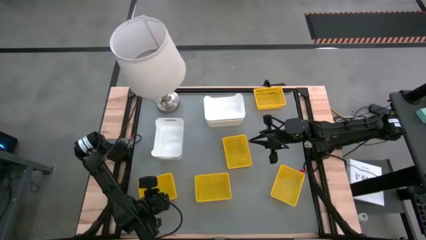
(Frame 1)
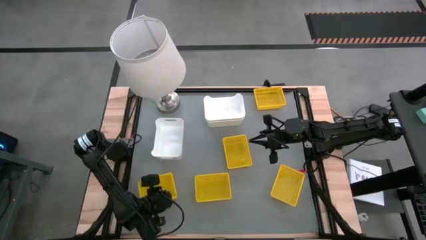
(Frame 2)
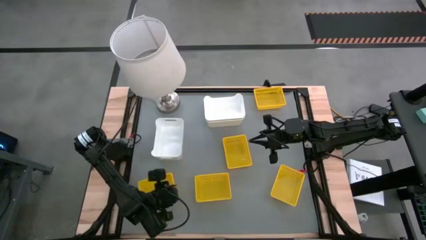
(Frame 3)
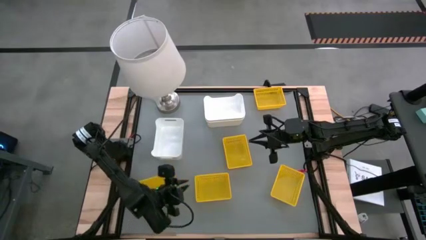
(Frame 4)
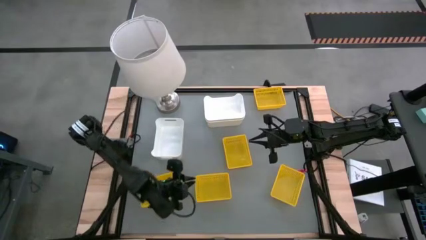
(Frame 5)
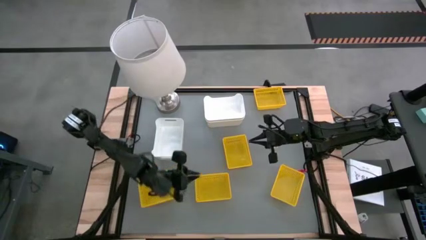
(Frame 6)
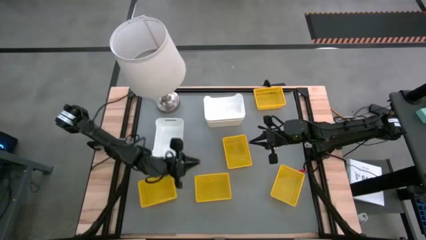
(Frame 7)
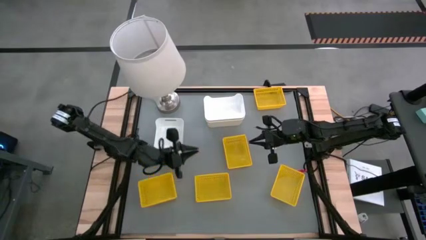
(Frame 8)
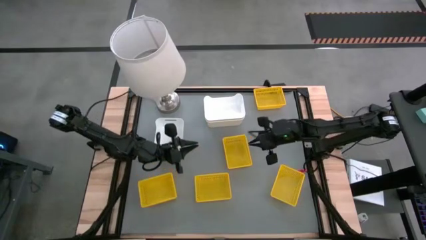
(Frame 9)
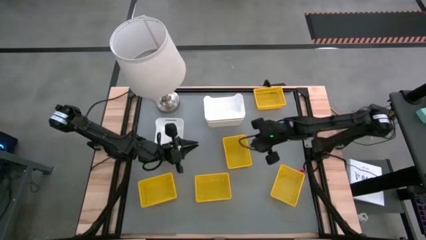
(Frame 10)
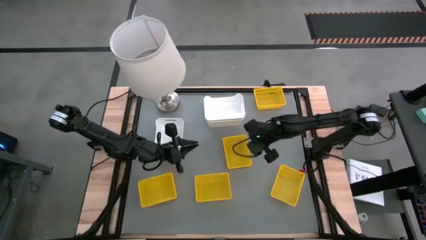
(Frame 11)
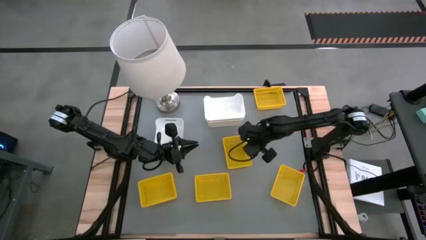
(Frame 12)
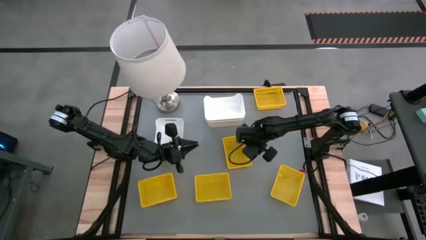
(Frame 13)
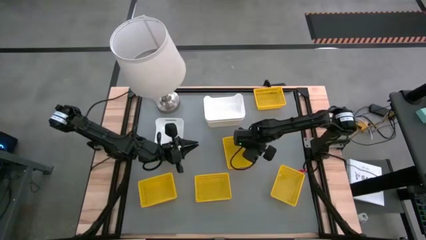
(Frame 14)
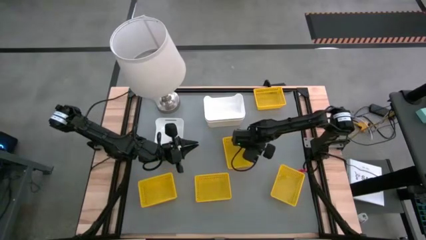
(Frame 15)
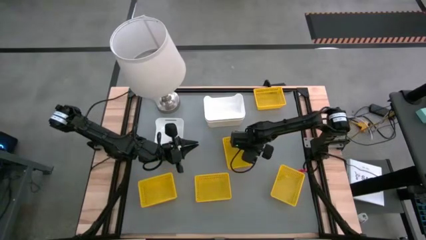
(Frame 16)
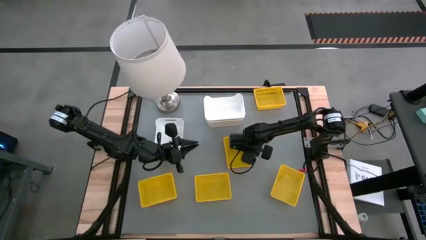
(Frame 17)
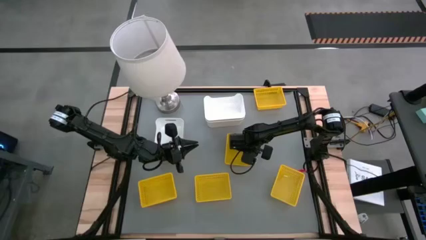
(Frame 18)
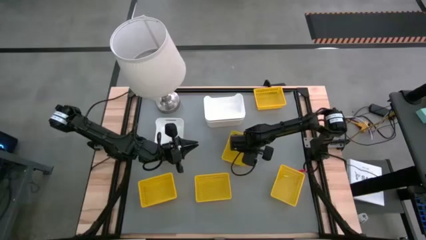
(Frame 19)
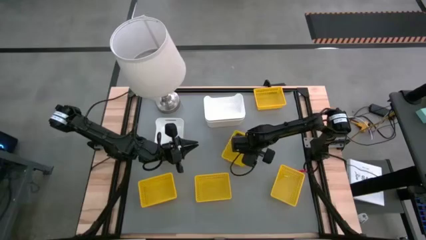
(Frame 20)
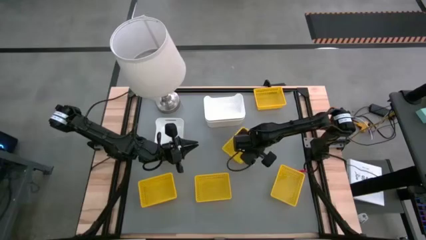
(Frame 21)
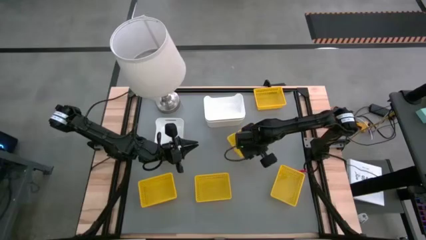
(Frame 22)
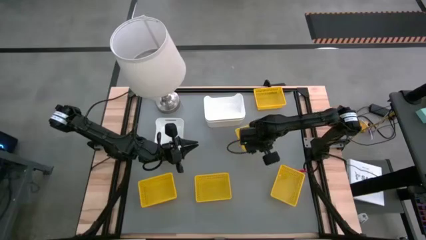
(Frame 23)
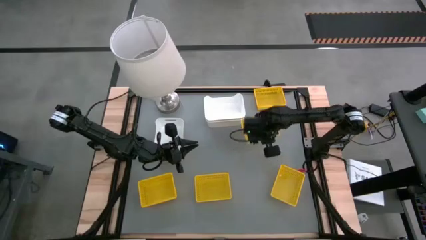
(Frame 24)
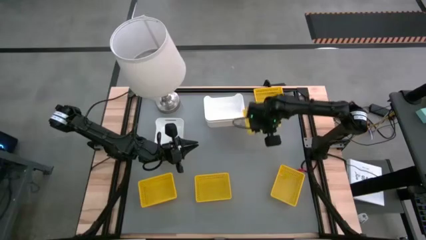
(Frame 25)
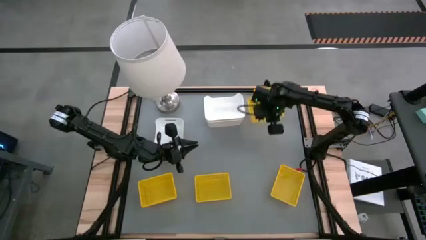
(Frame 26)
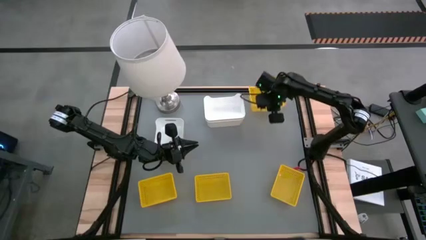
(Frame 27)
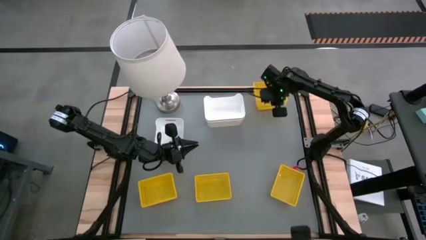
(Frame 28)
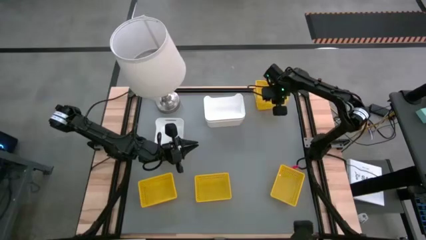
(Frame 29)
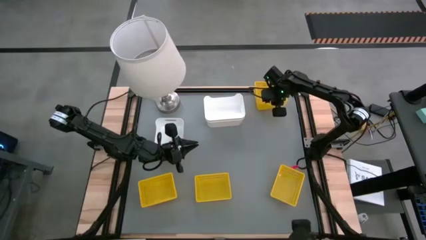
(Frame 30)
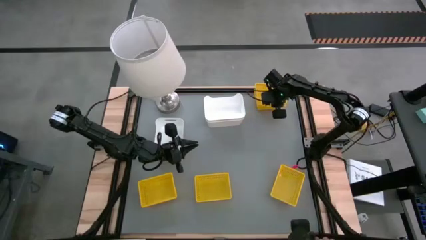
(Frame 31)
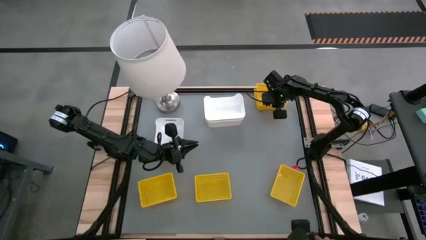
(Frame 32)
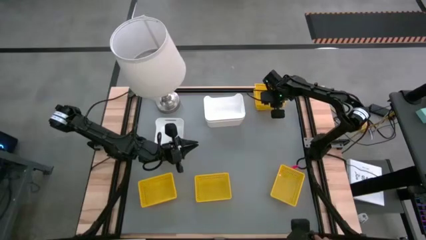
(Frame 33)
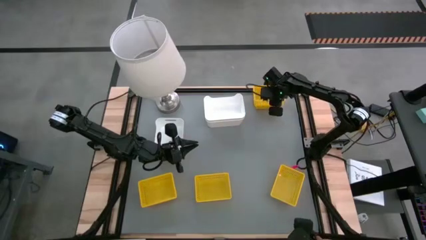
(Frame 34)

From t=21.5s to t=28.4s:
Stack the yellow basket on the other yellow basket

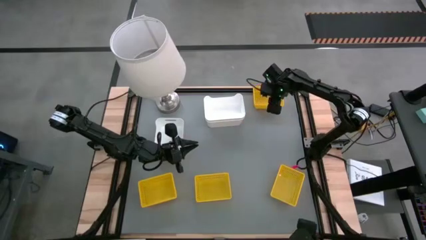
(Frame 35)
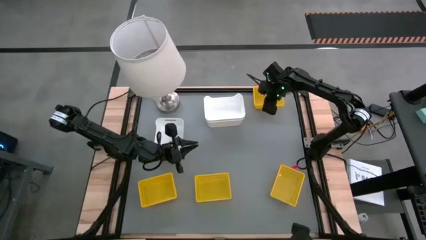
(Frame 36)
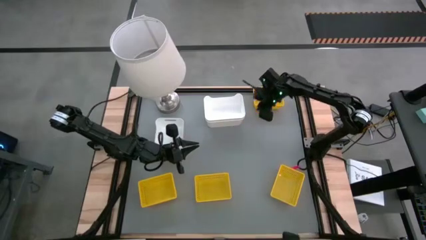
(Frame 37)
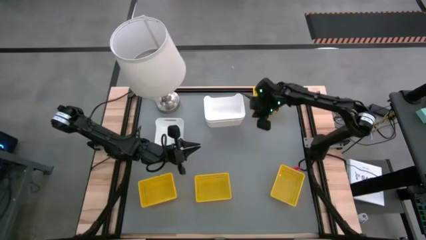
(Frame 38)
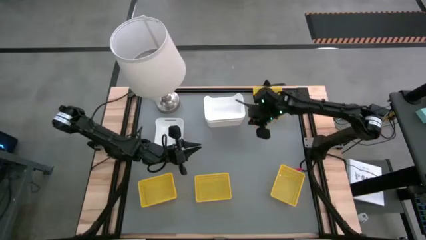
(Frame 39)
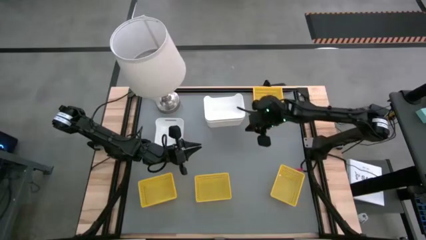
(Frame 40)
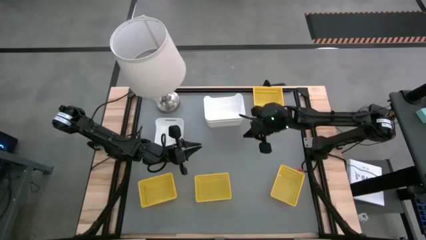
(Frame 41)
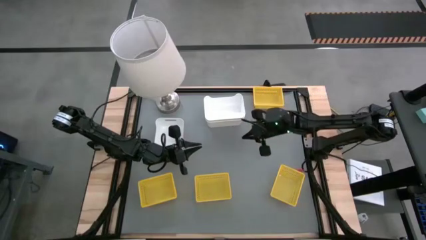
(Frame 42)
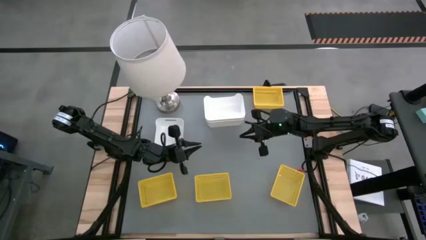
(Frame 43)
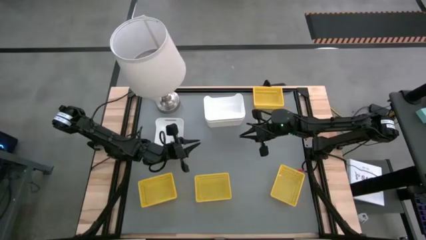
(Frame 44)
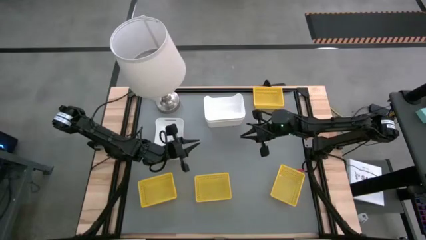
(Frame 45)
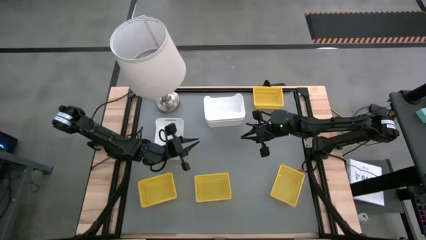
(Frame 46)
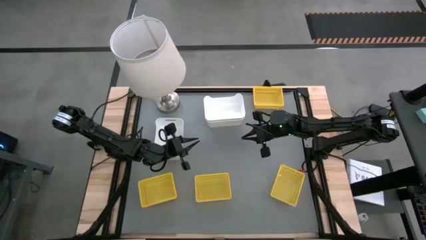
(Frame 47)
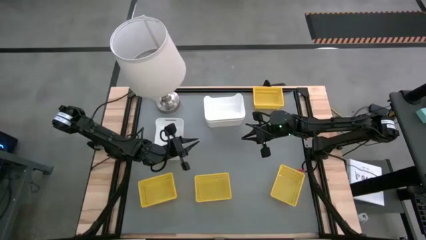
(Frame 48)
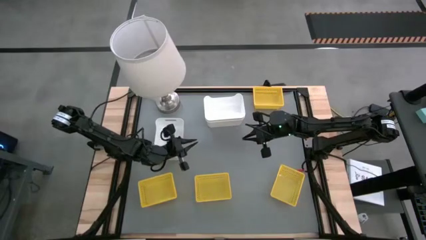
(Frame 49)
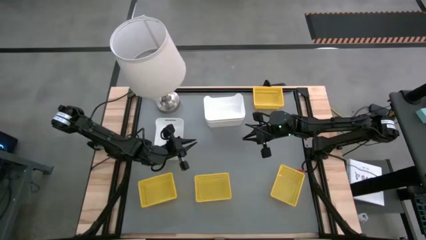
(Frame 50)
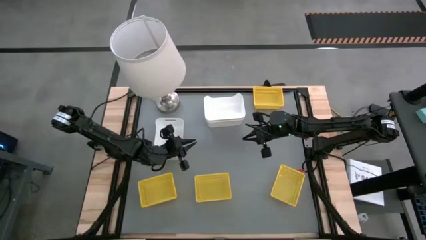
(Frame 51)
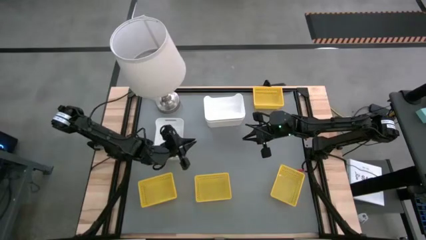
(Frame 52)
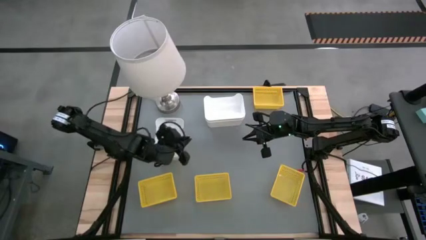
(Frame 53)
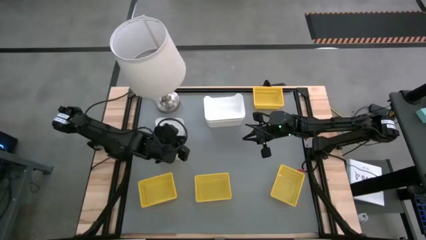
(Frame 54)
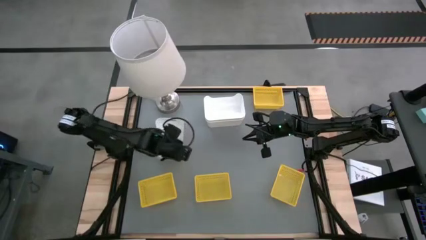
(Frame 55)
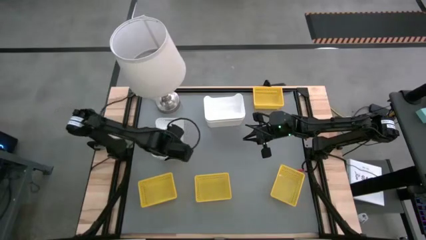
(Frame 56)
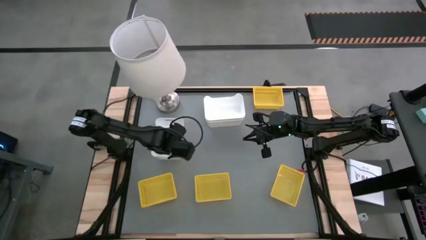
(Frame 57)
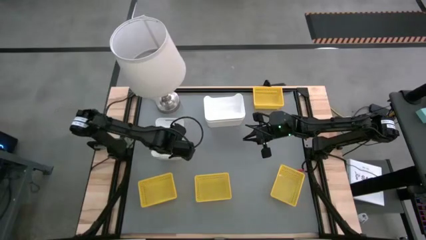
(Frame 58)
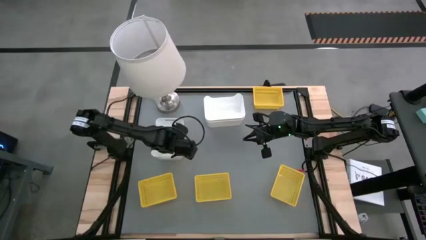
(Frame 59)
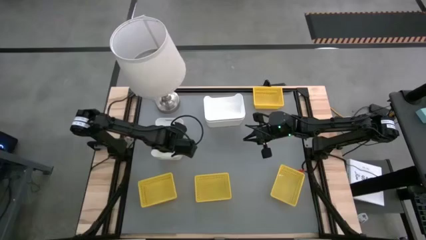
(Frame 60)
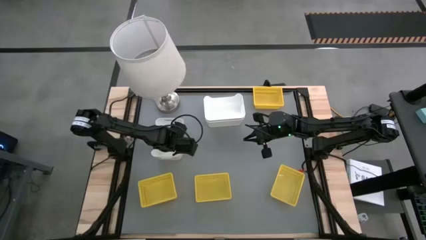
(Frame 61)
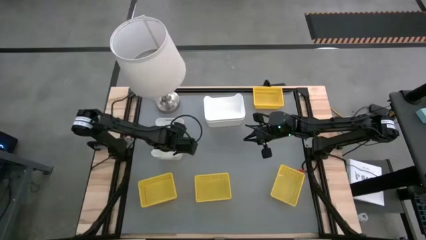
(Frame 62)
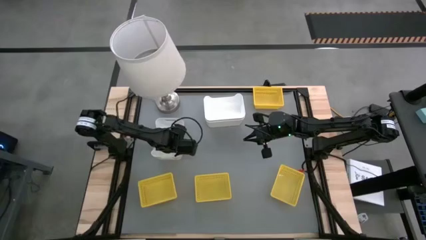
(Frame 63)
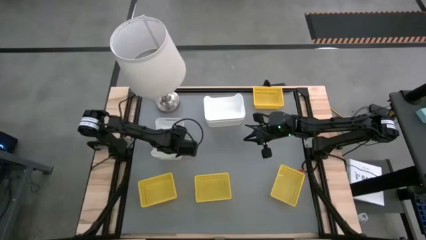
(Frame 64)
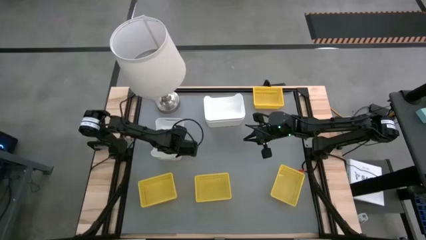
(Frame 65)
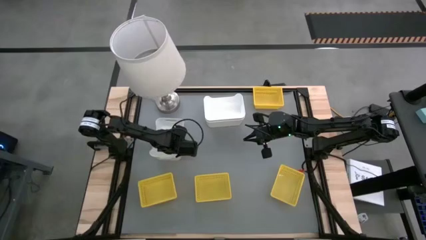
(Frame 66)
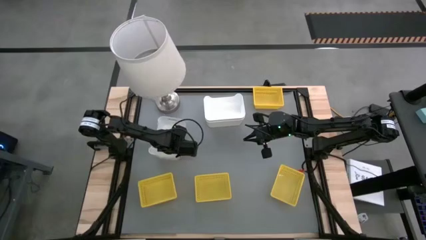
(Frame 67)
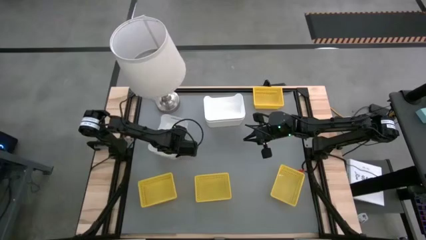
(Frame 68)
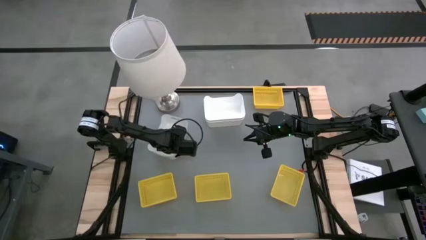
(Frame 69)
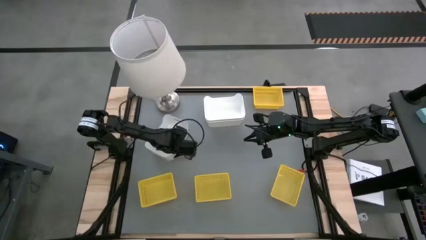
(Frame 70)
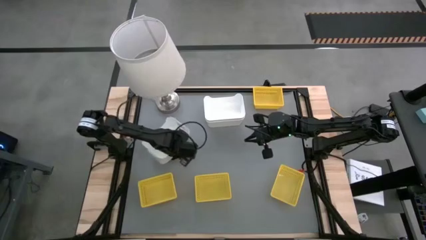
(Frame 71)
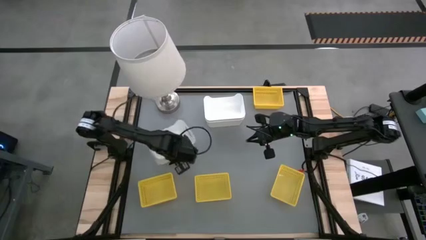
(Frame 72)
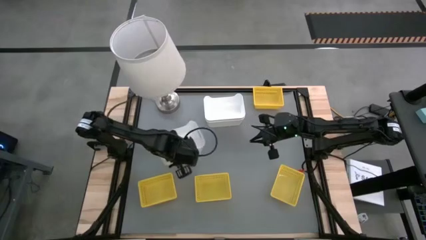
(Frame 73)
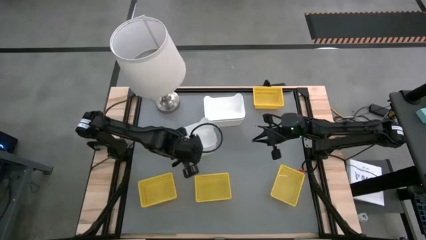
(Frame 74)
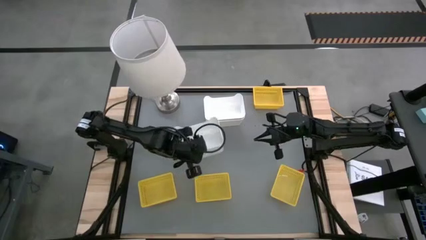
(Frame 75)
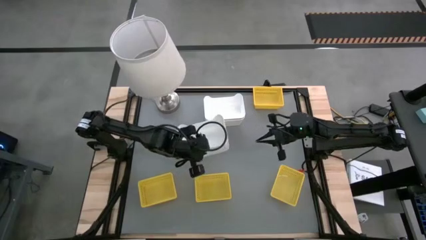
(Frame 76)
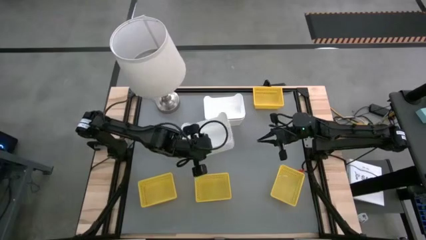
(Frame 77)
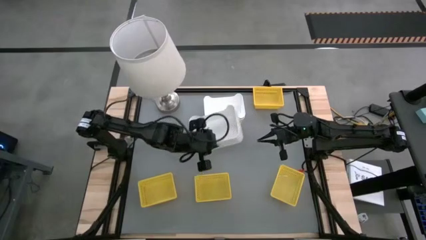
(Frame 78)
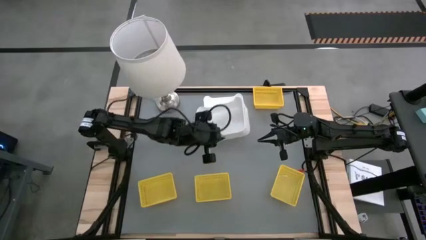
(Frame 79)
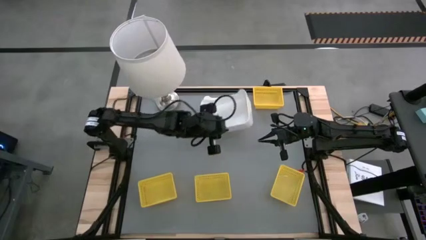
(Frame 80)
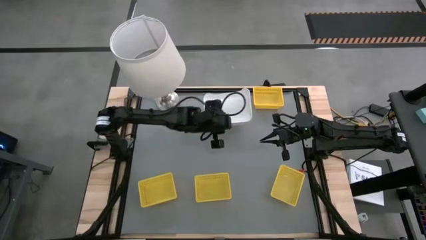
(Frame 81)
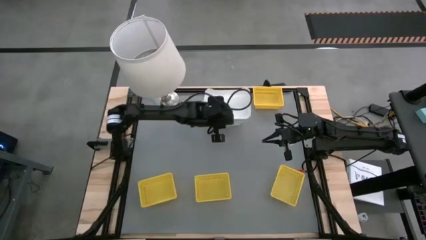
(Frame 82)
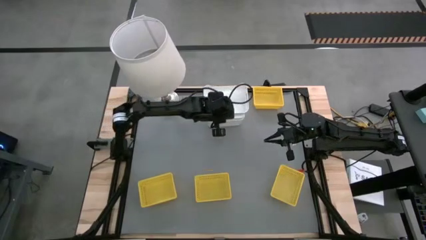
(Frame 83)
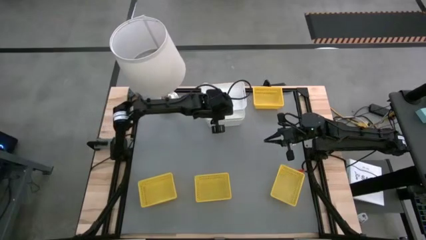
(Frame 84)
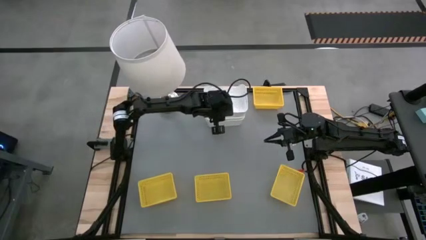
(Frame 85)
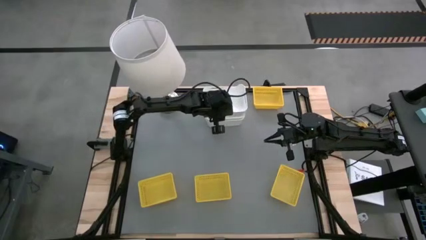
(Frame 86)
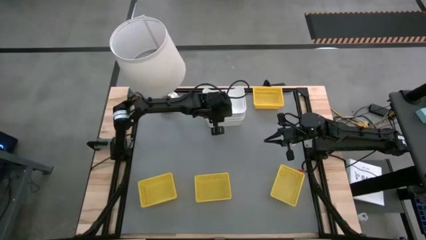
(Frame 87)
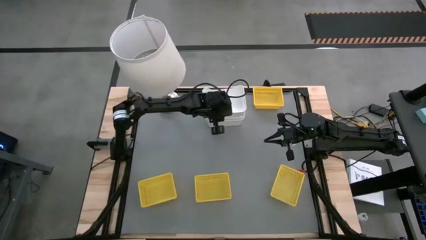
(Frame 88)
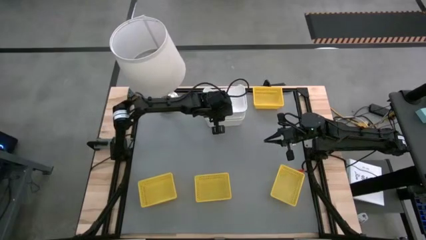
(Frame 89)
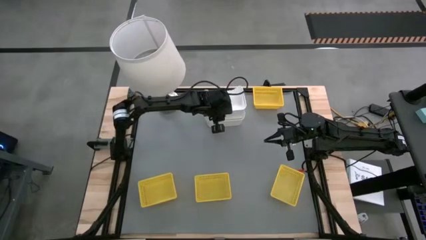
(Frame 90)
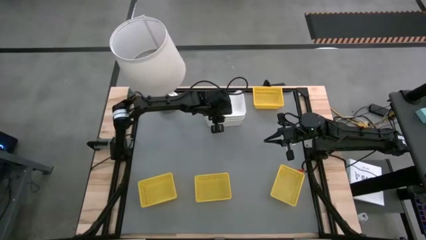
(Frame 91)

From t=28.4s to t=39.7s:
Stack the white bin on the stacked white bins
